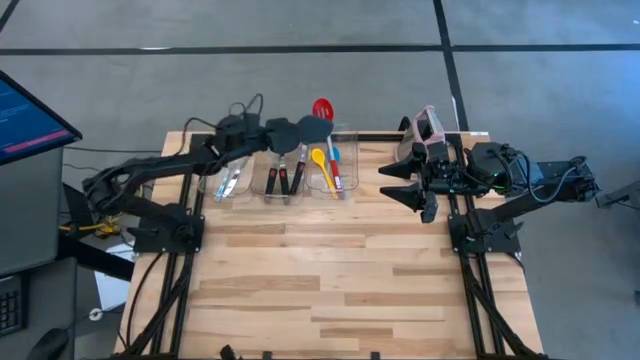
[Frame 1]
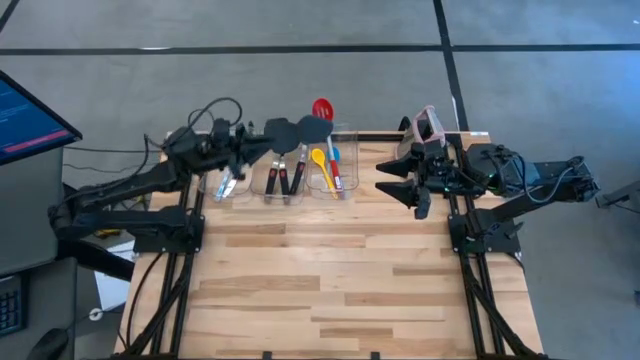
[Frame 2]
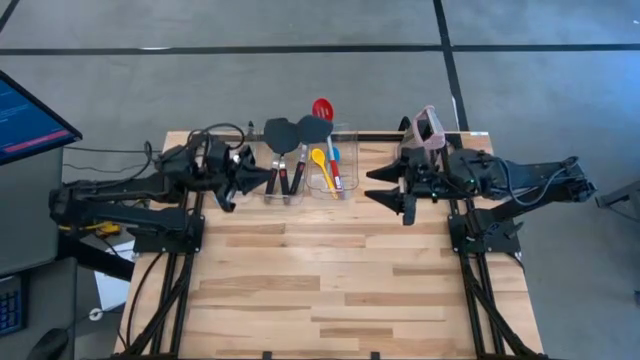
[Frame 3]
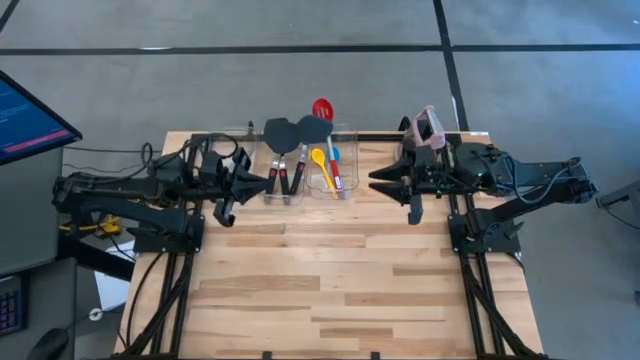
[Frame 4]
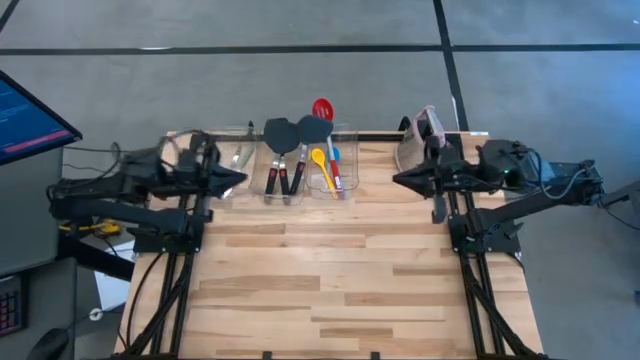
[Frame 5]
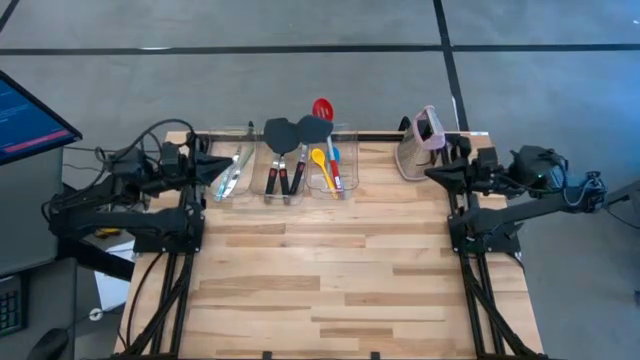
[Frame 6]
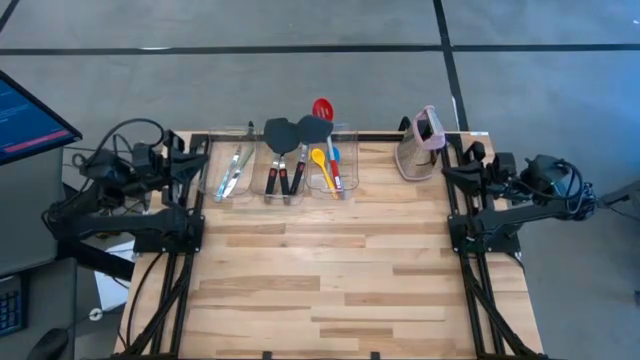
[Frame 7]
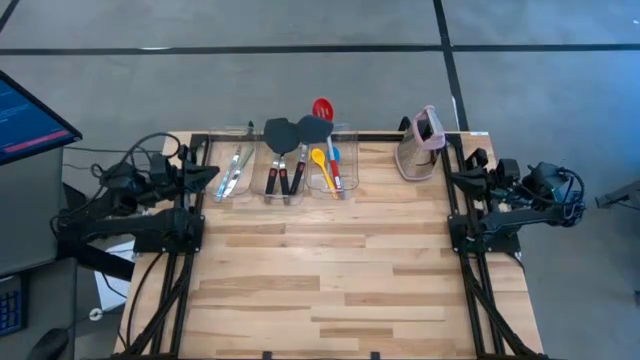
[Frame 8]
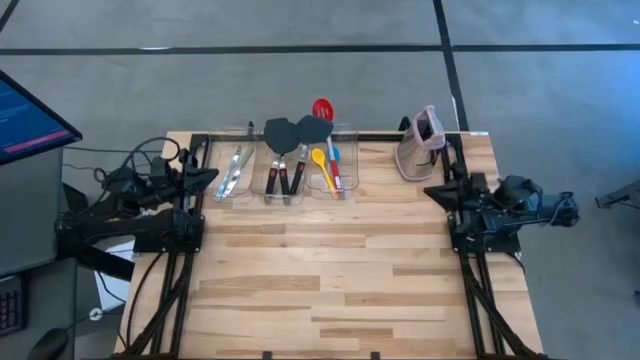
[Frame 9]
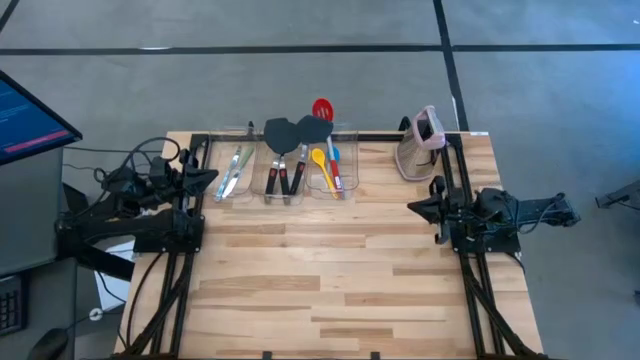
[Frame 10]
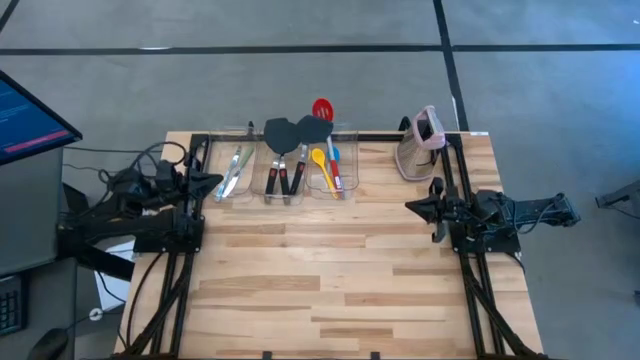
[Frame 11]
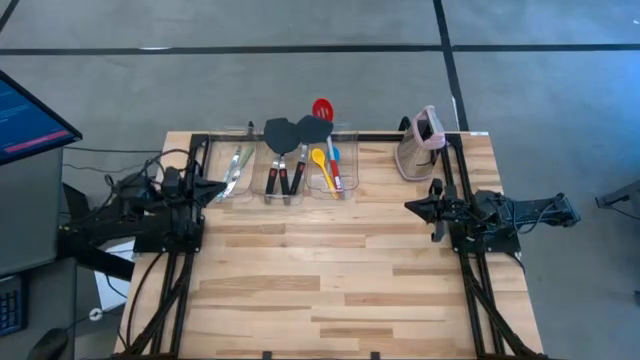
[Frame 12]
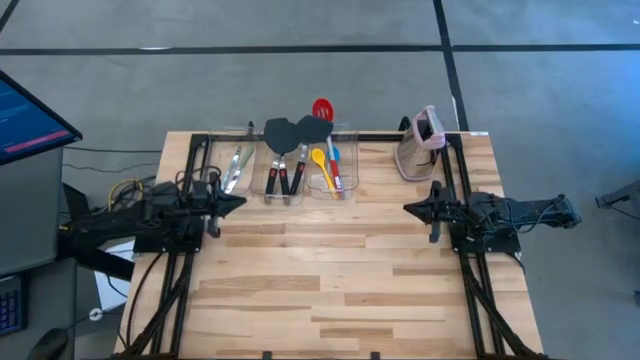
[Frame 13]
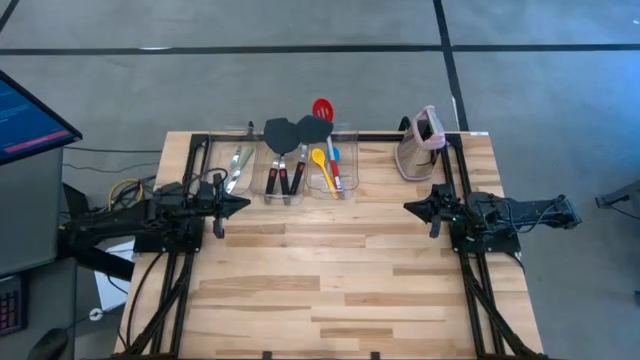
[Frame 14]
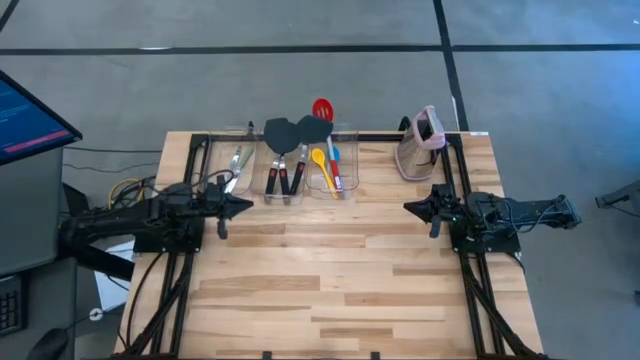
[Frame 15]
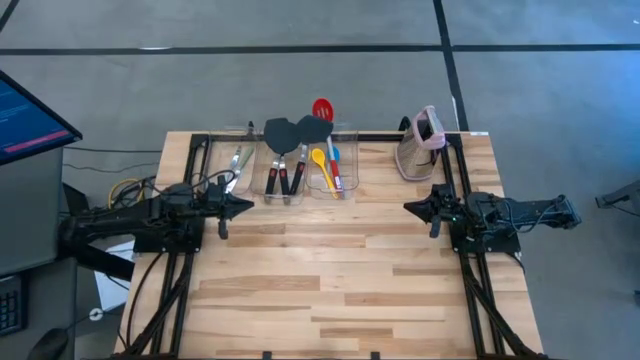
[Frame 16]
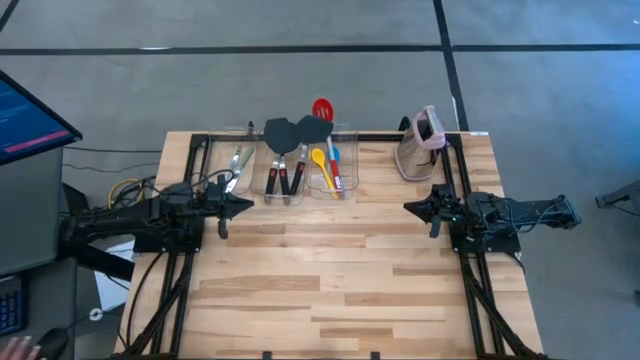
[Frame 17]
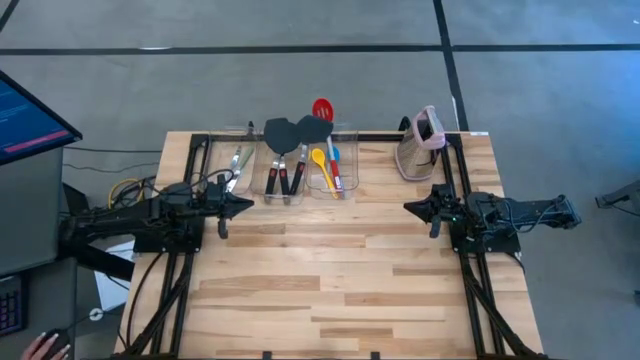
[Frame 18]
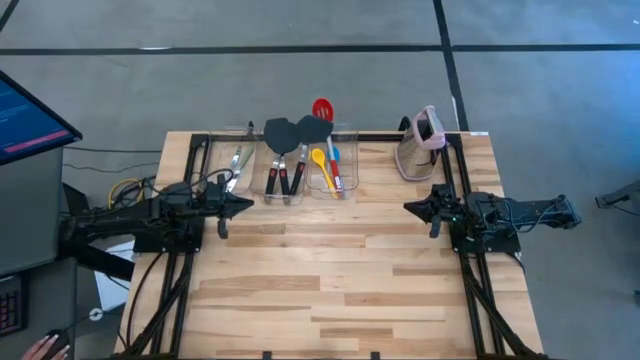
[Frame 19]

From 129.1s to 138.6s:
Task: Pick & Place Kitchen Items
Return to Home Position

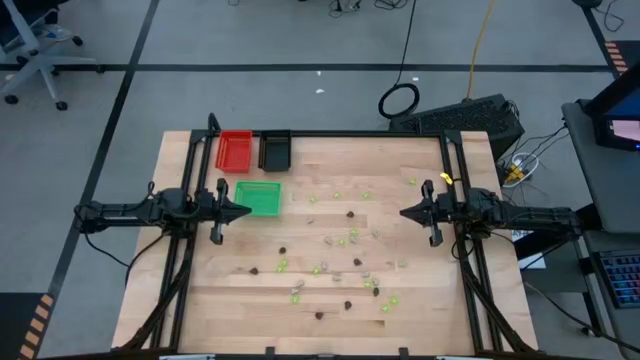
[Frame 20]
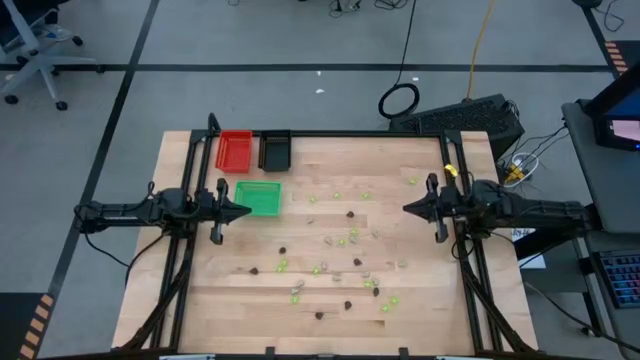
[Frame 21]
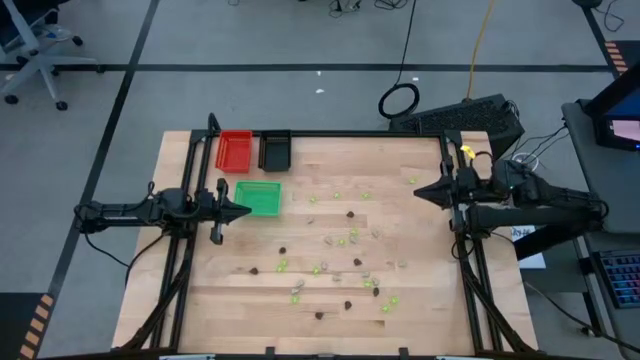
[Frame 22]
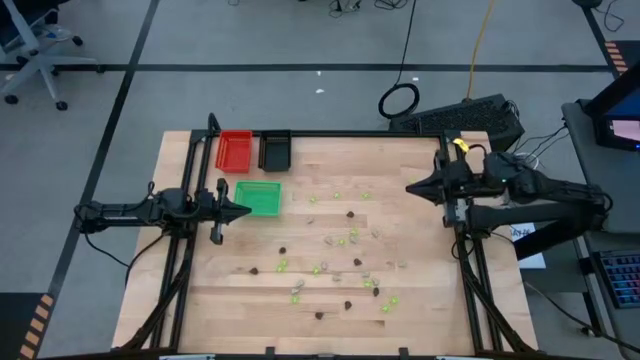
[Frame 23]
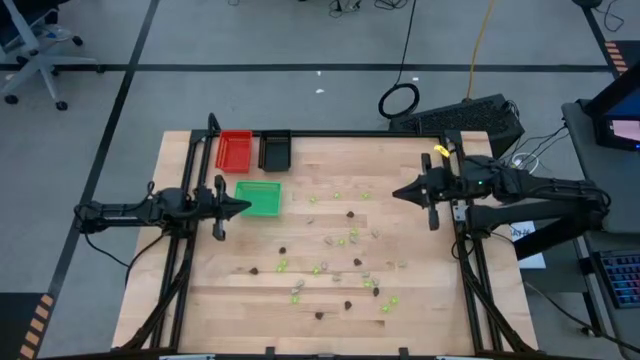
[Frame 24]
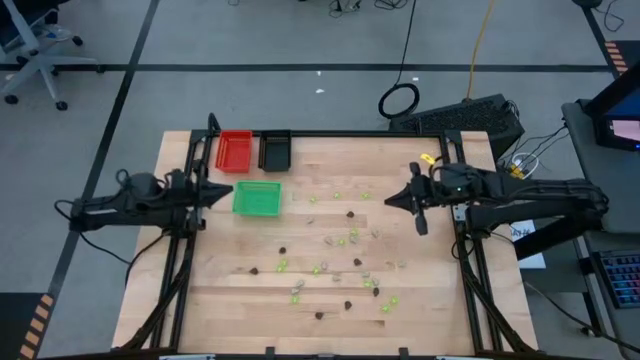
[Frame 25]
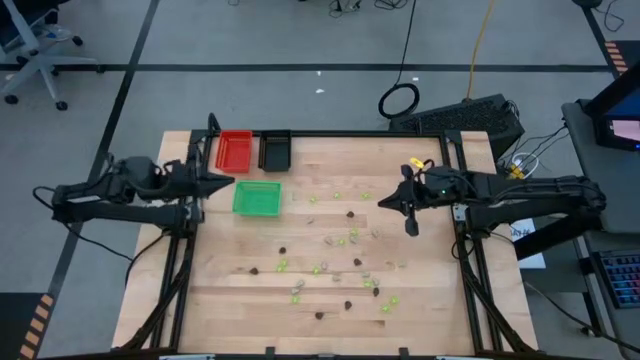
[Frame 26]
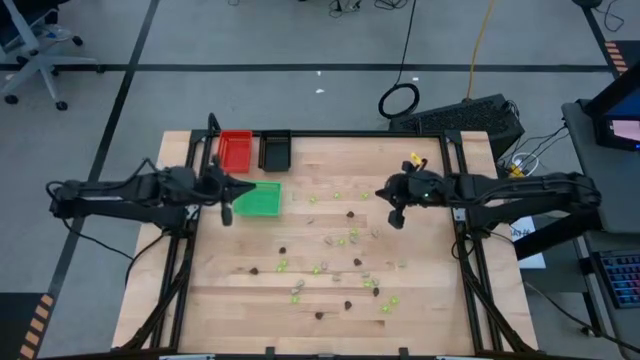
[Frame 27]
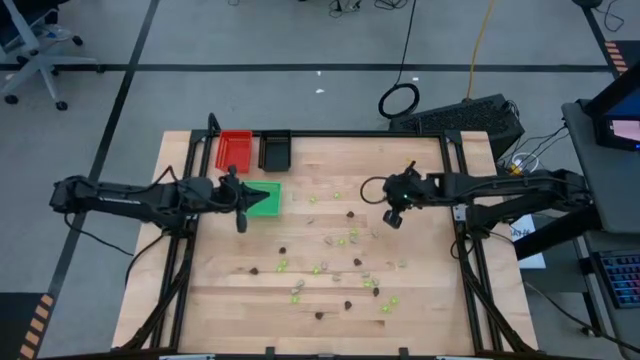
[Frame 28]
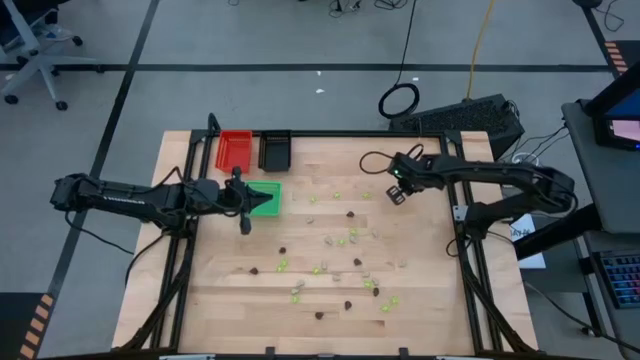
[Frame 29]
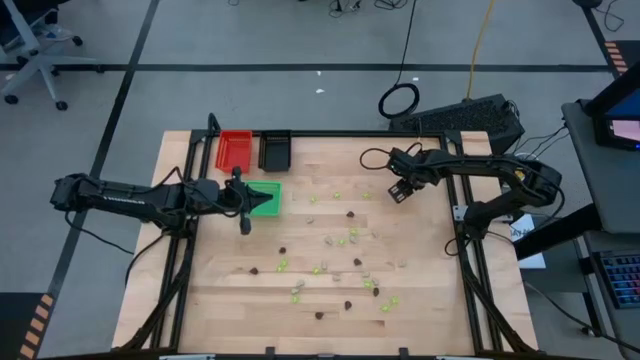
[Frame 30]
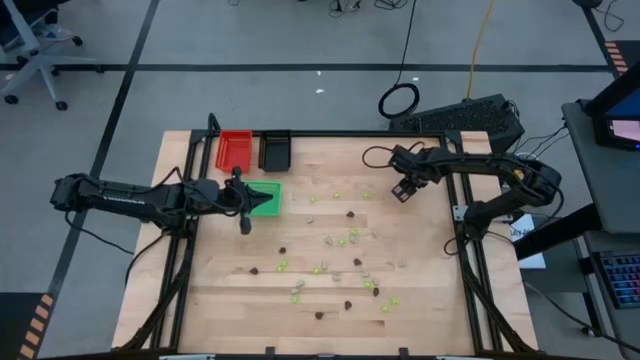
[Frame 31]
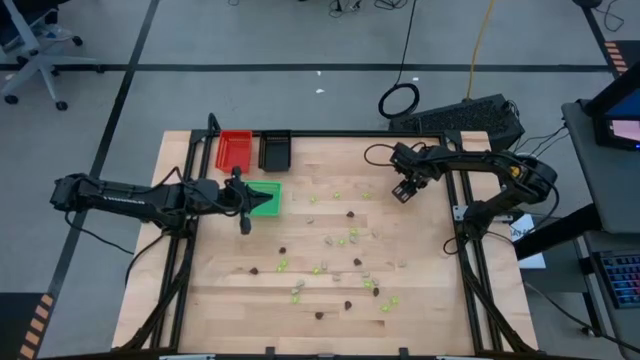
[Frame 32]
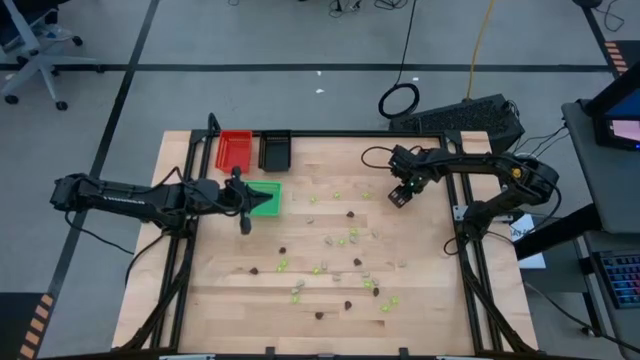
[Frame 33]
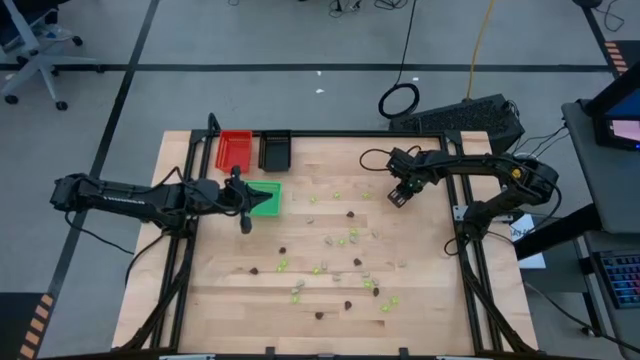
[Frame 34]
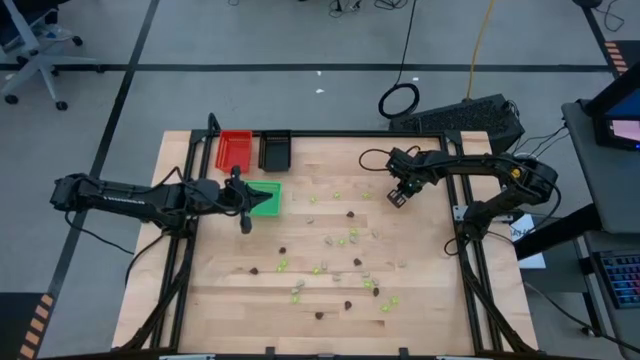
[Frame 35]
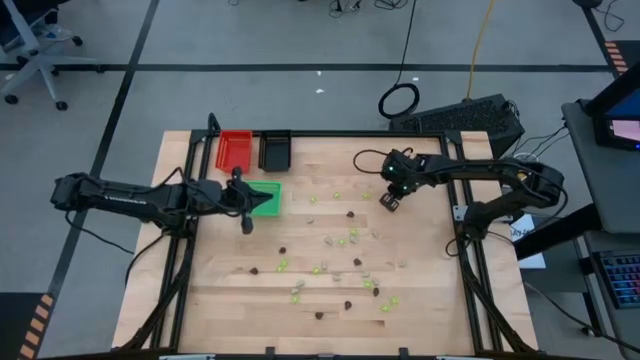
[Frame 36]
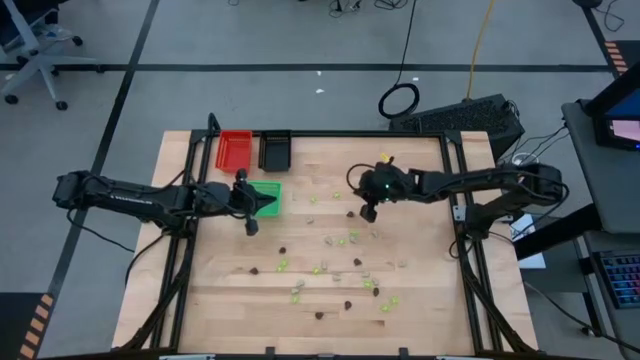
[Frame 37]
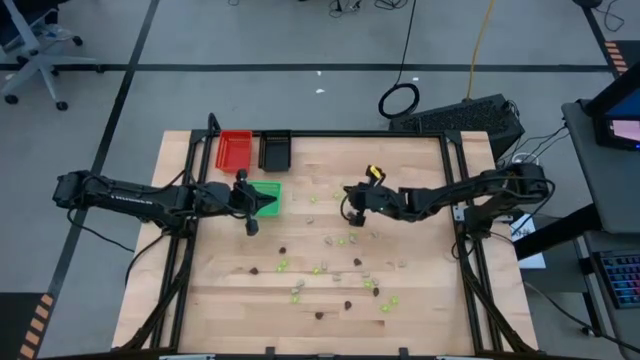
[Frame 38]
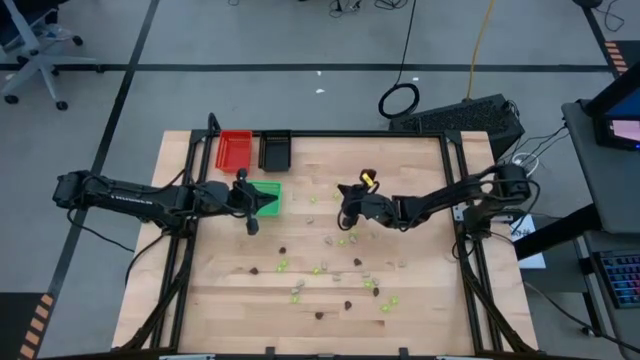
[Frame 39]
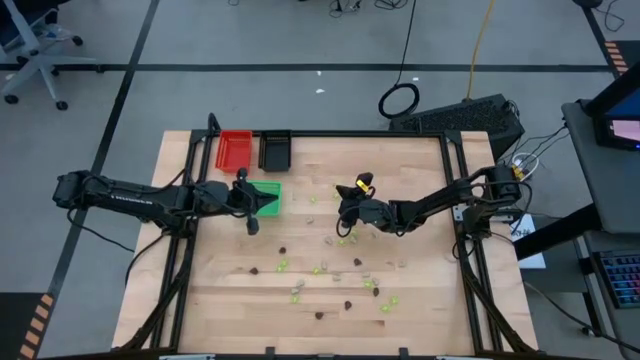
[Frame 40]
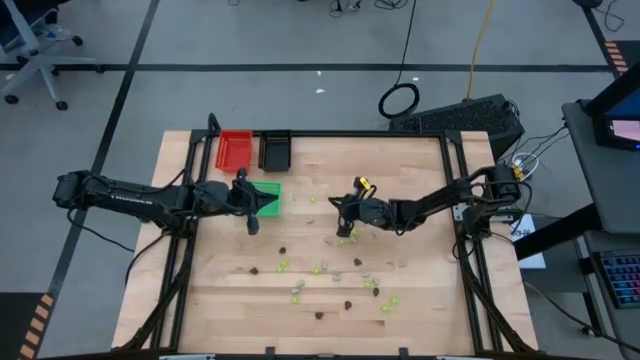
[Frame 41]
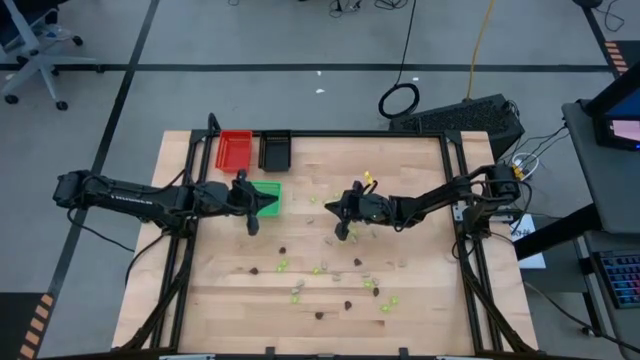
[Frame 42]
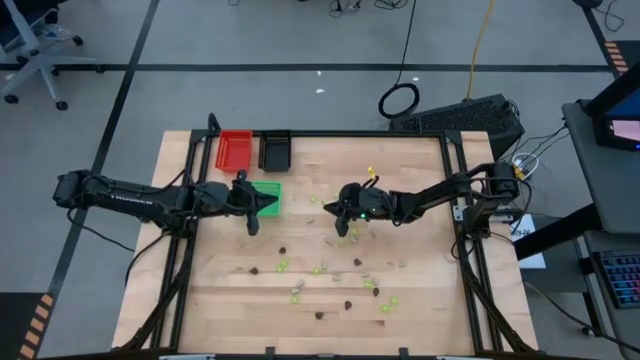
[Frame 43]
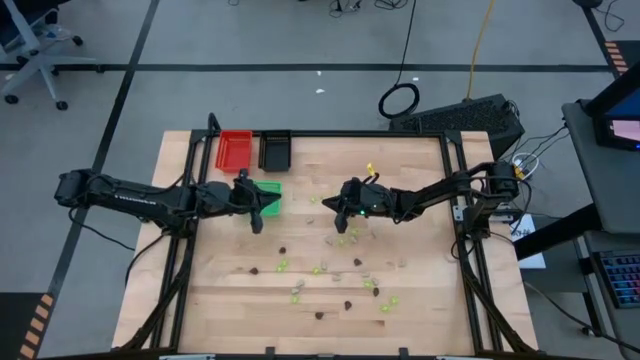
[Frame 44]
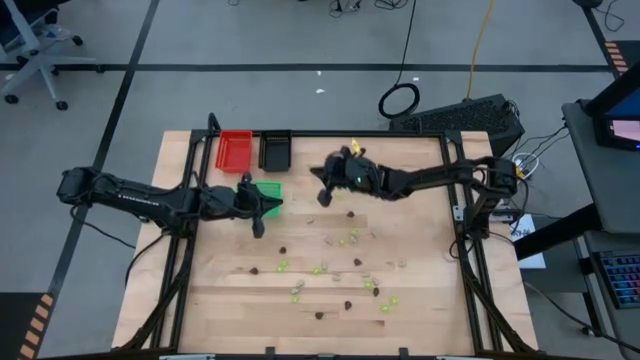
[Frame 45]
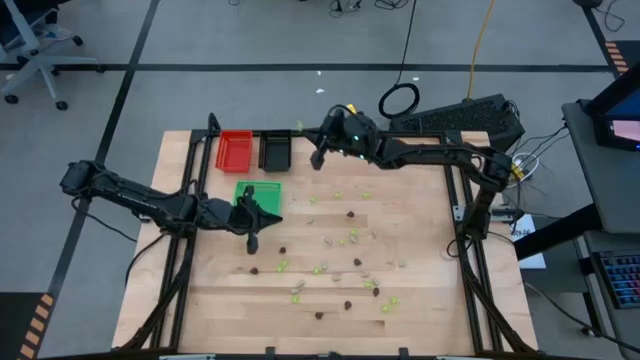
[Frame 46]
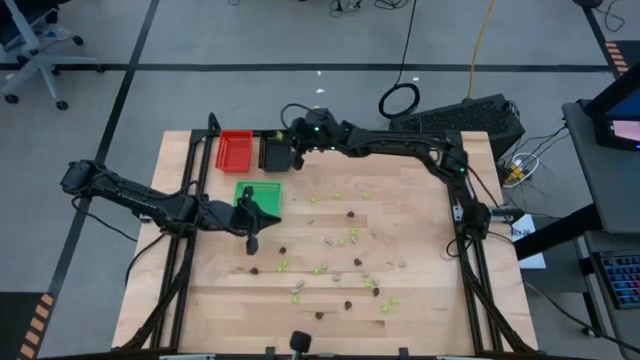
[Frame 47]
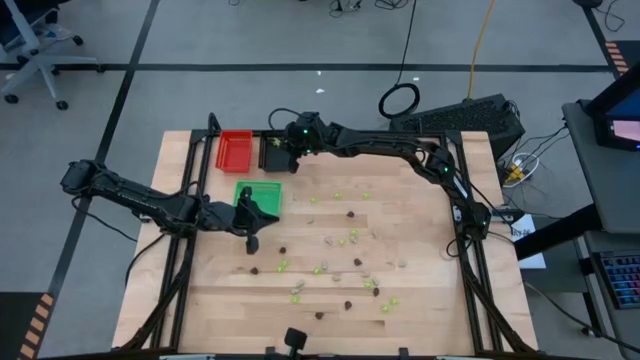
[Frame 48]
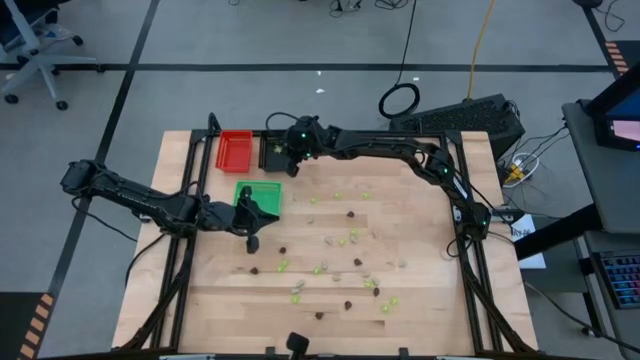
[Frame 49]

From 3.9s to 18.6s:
Task: Sort Halloween decoration
Put the green spider toy into the black bin
